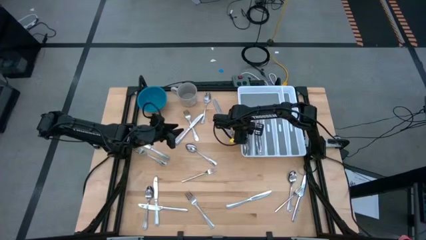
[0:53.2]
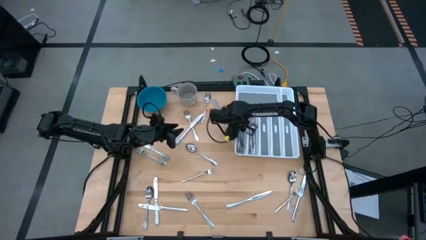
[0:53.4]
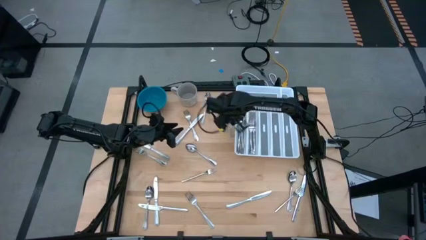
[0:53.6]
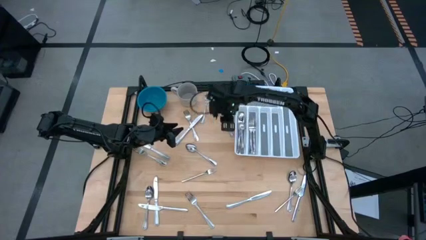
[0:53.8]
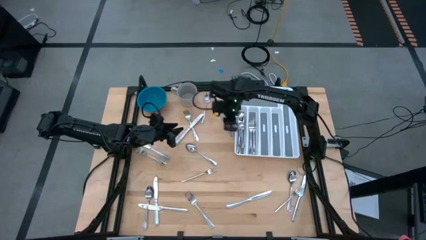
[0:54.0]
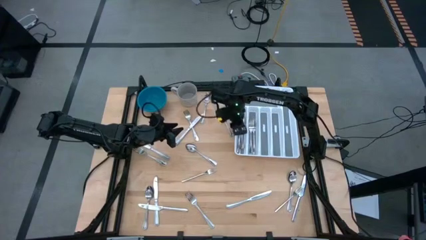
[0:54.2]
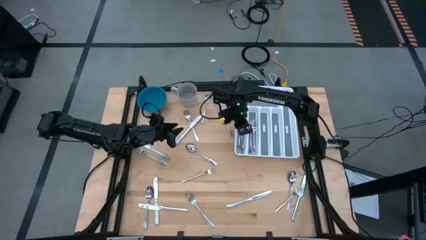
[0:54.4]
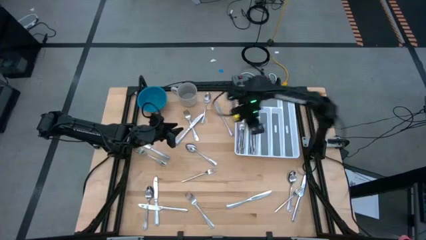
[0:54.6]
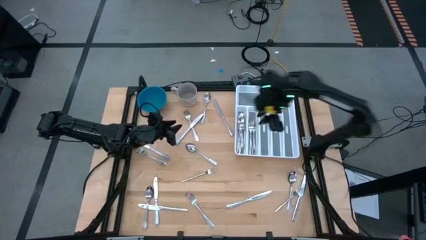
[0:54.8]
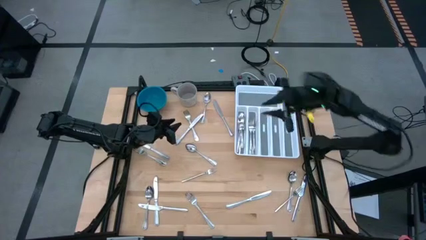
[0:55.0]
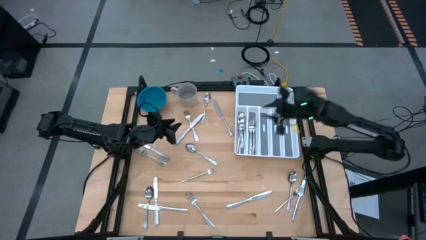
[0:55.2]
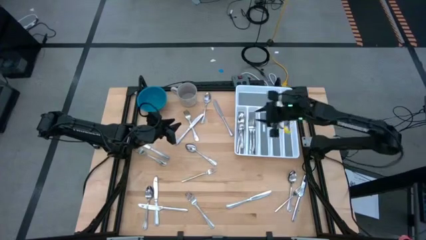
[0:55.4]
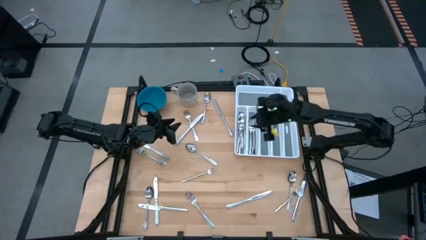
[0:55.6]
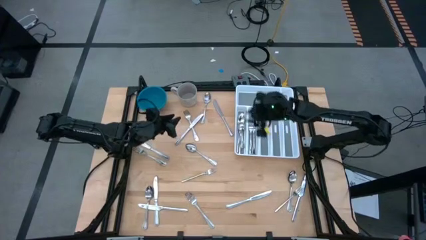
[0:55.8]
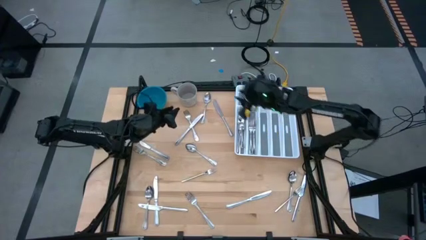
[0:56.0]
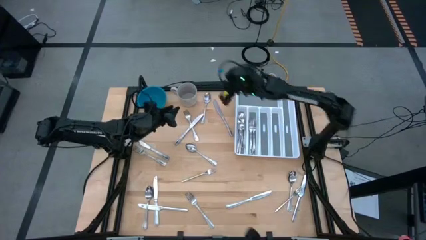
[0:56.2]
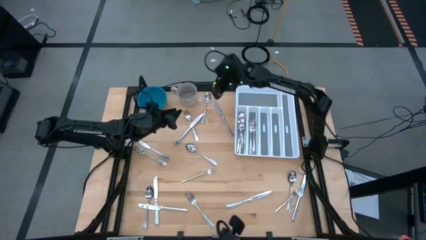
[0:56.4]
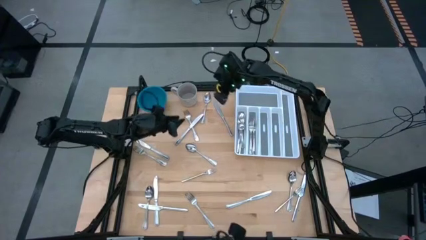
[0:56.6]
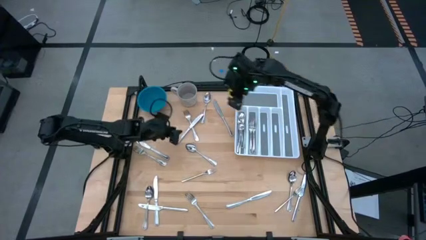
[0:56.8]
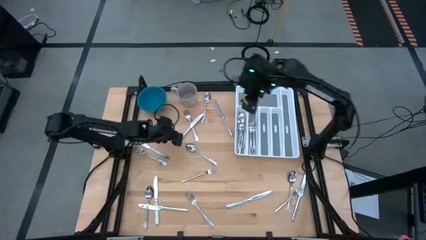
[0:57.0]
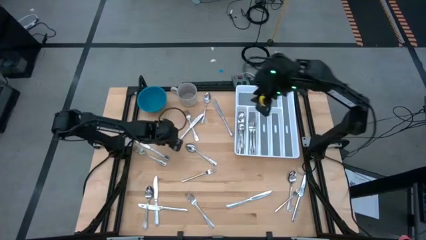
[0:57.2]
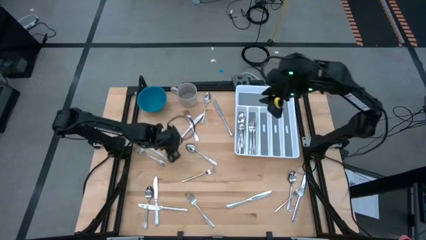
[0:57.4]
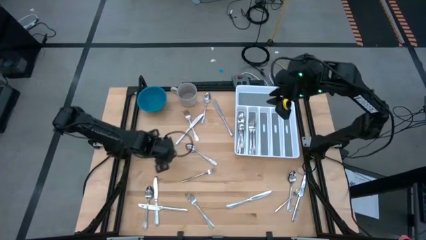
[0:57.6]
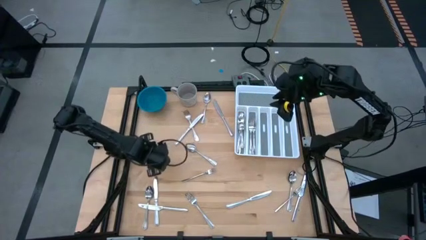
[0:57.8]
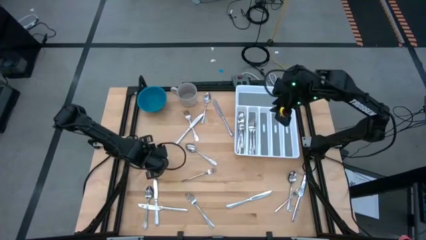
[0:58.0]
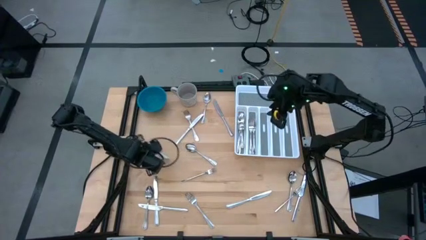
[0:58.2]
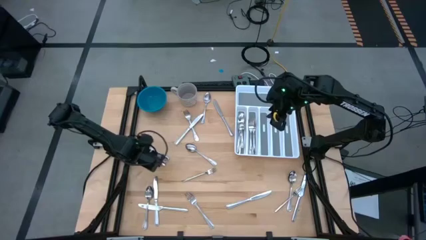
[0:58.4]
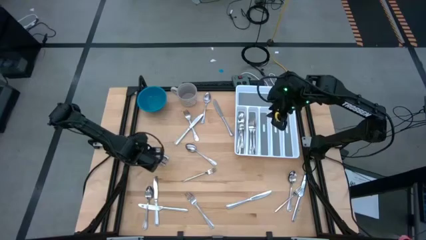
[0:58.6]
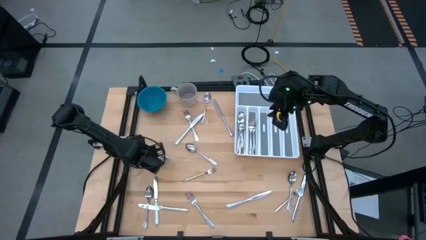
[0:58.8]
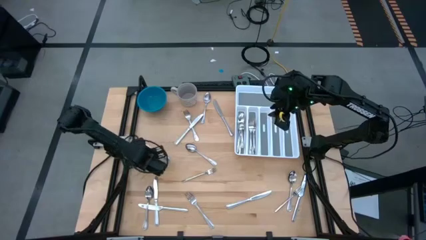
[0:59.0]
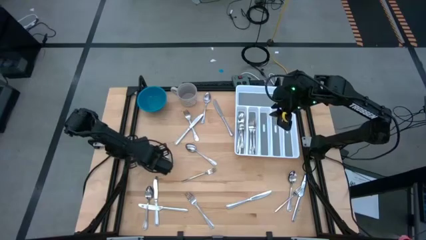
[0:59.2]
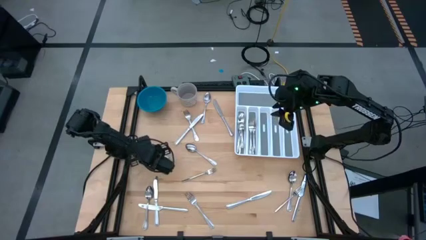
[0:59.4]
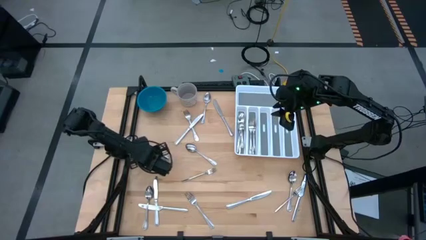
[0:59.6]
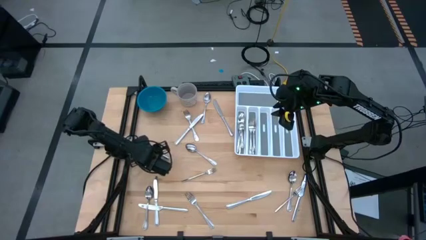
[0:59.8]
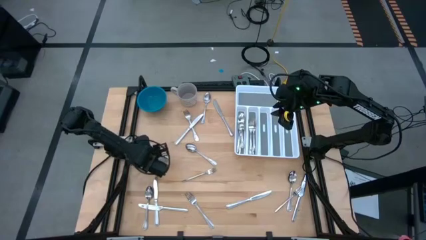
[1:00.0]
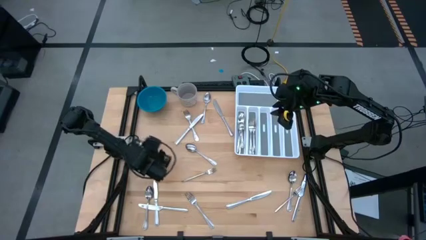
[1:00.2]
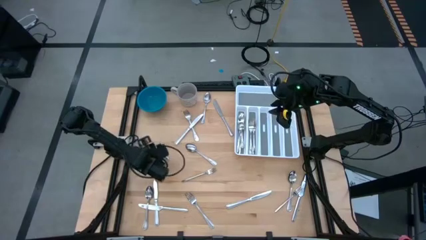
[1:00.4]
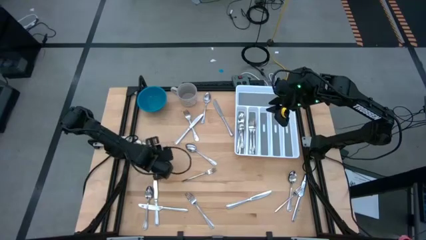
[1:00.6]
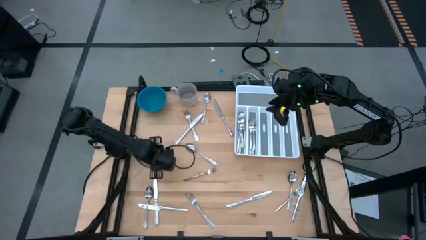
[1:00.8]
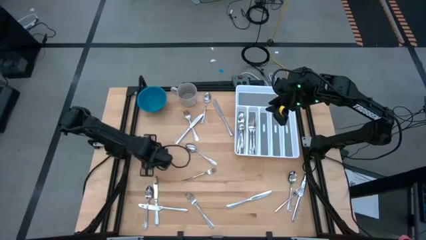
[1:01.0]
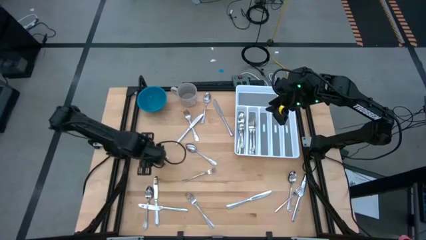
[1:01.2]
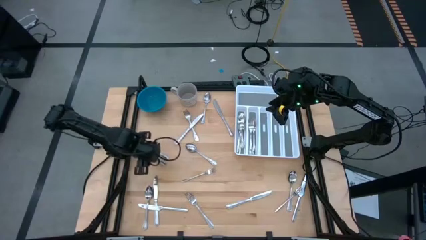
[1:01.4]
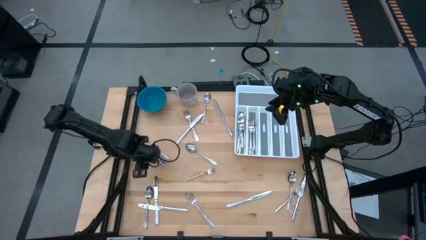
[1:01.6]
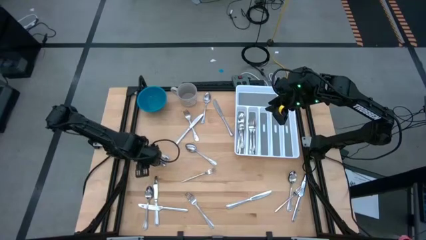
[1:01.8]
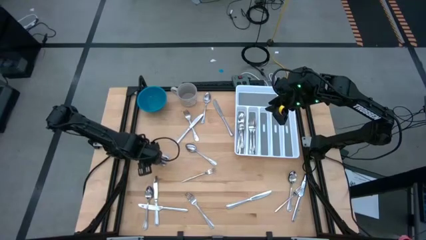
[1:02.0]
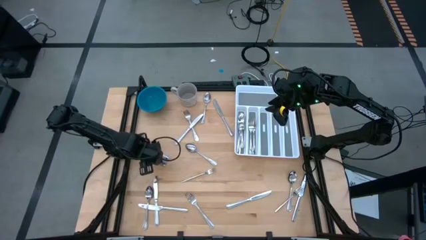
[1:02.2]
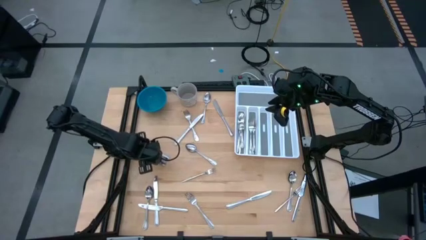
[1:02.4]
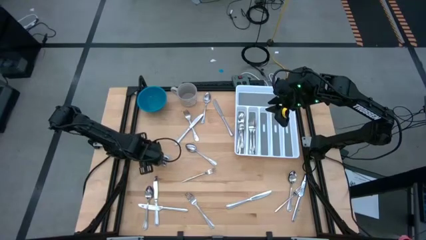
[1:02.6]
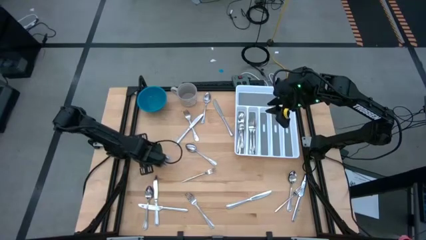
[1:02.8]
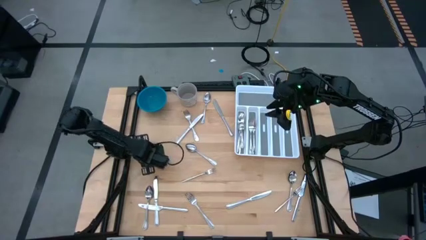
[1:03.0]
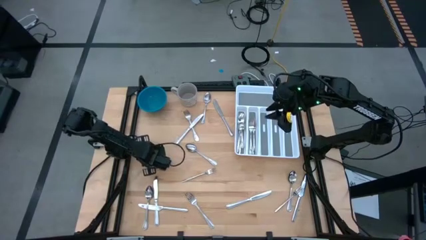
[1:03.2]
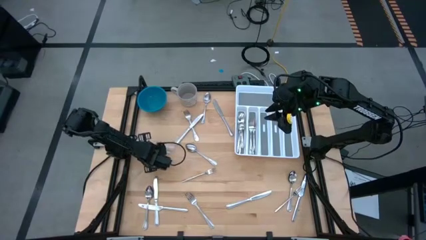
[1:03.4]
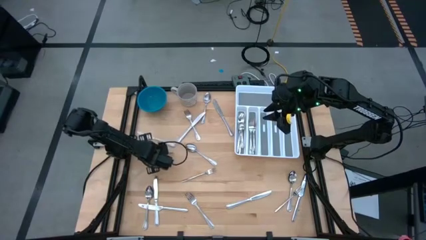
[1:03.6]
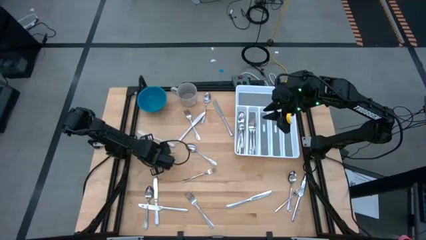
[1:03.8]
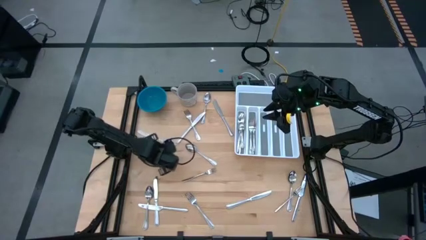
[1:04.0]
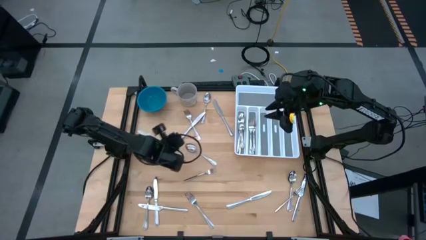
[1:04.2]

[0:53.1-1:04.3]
Task: Sort silverware
Put the fork in the silverware tray

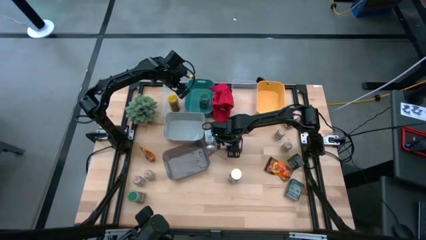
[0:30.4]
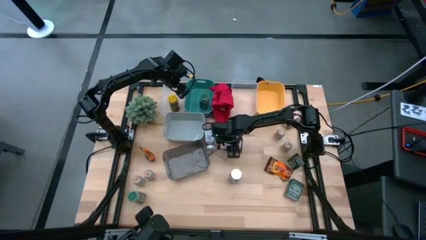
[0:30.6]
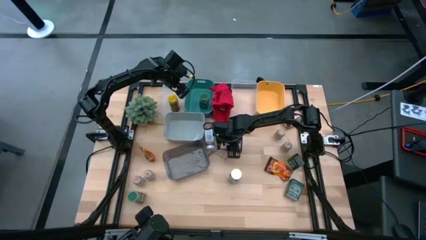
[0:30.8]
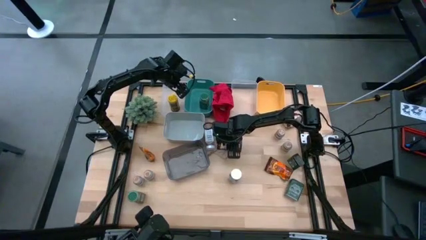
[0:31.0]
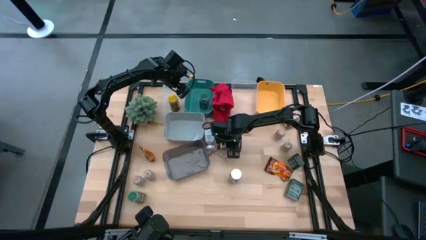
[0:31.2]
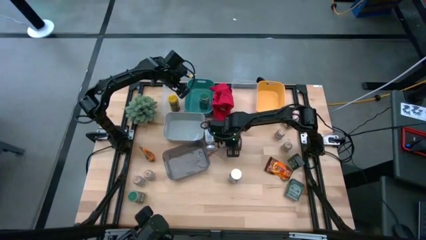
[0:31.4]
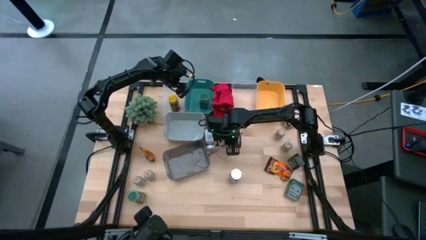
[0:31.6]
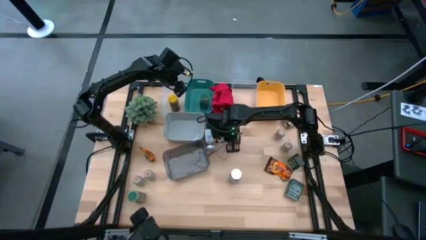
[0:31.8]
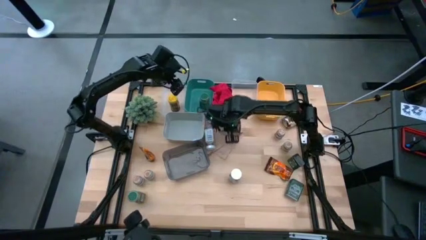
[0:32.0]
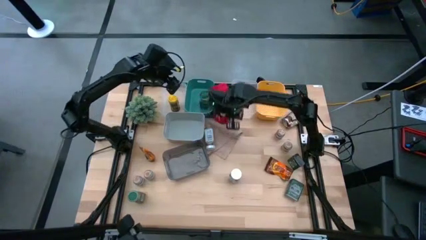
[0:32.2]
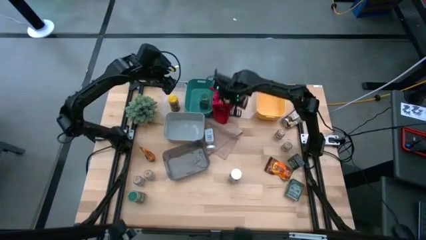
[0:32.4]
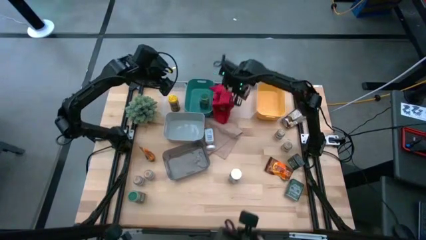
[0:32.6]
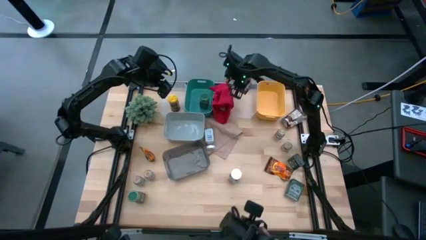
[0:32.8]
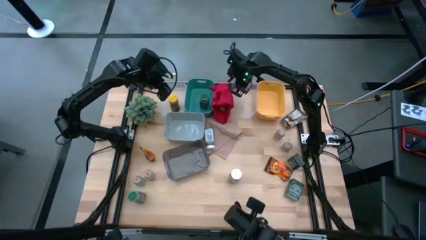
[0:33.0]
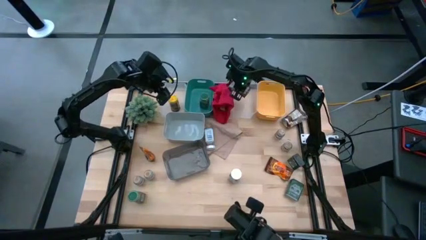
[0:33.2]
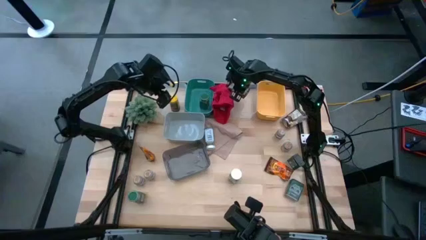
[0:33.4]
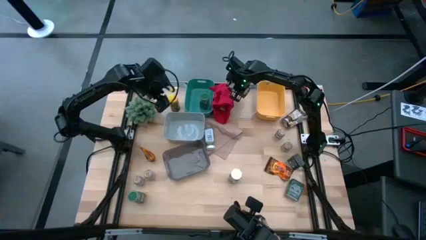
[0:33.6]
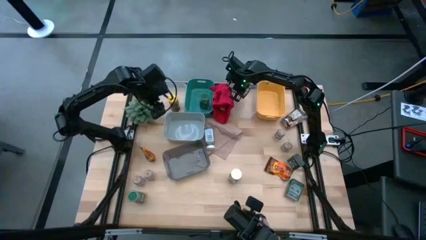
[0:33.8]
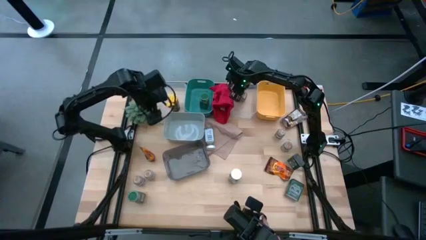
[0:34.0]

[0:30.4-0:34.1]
Task: Sort spices by type
Put the orange seasoning pack into the right transparent bin

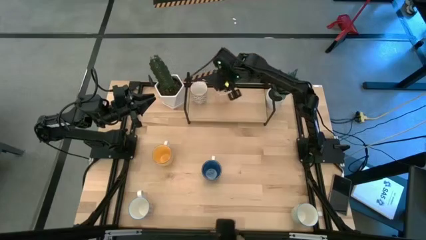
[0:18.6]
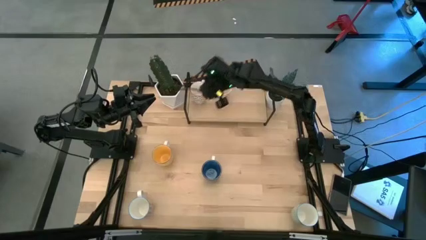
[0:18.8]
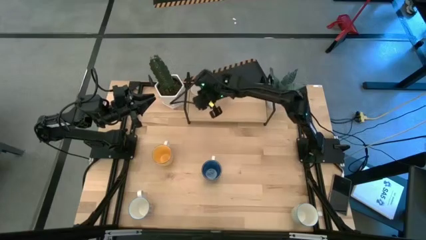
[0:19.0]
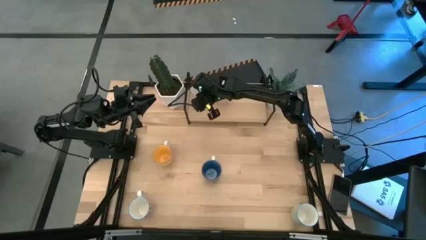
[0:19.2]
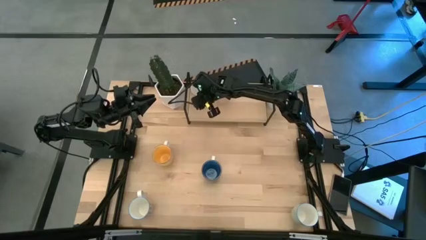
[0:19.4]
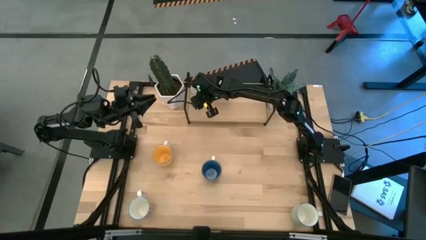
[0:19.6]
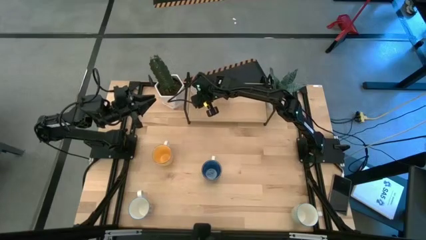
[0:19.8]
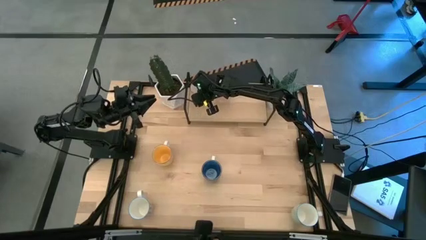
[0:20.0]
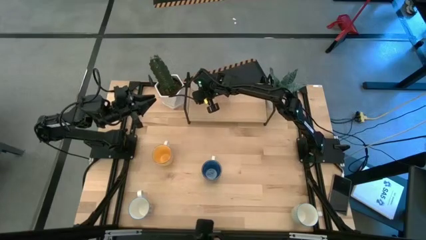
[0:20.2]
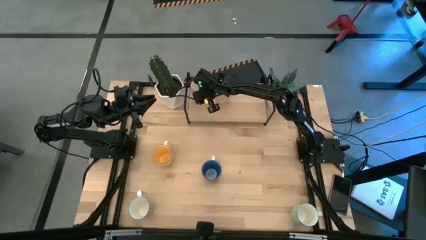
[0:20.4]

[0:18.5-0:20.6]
Task: Place coffee mugs
Adjust the gray patterned mug on the shelf

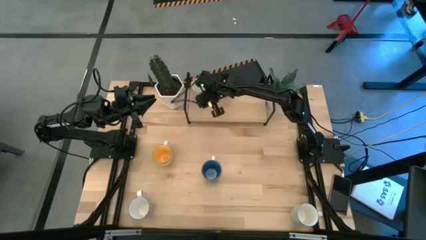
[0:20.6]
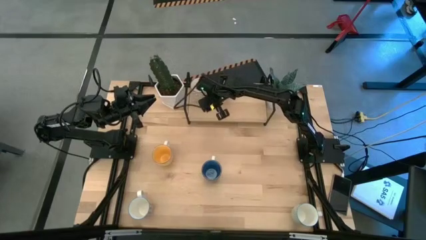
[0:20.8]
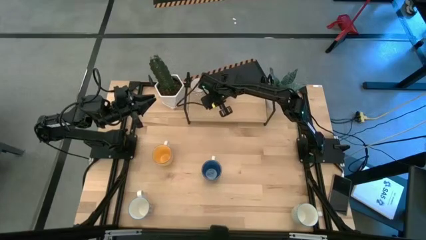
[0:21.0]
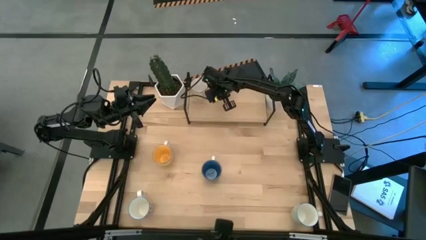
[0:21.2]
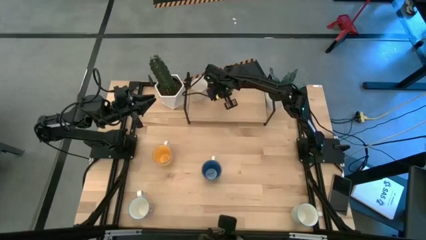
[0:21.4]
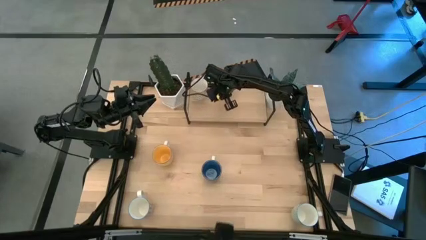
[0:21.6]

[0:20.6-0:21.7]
Adjust the orange patterned mug on the shelf
